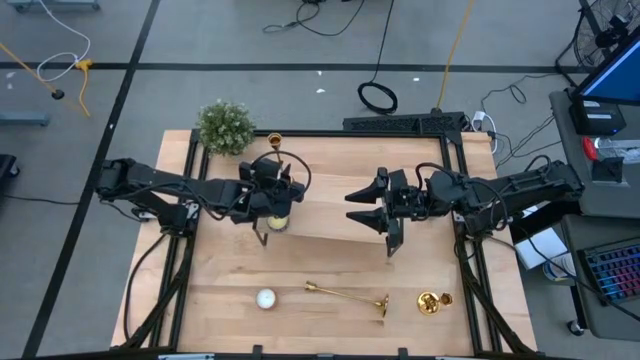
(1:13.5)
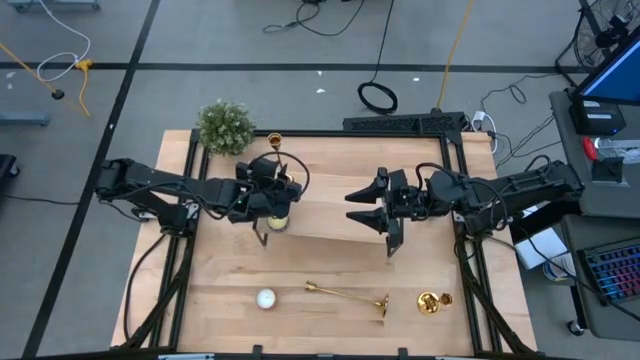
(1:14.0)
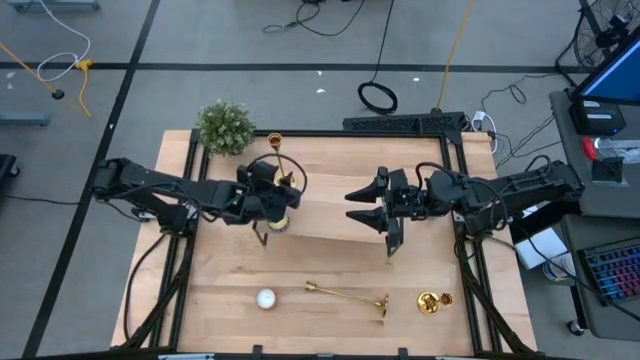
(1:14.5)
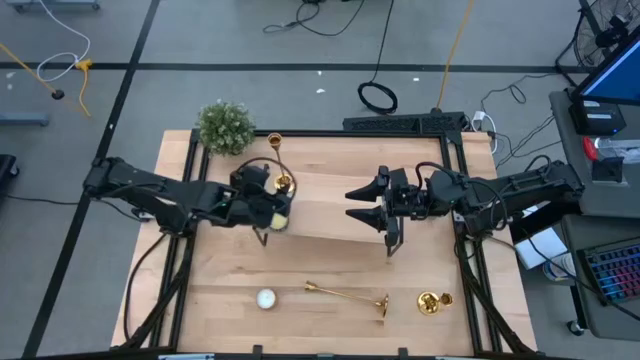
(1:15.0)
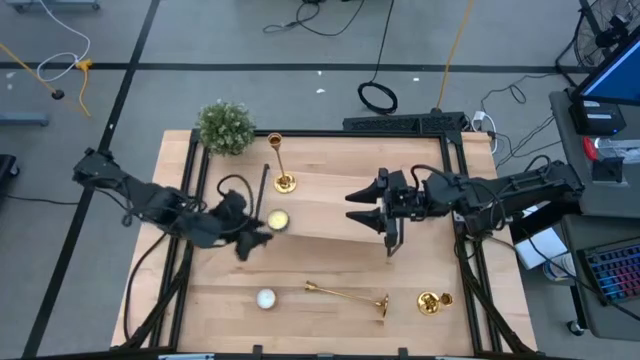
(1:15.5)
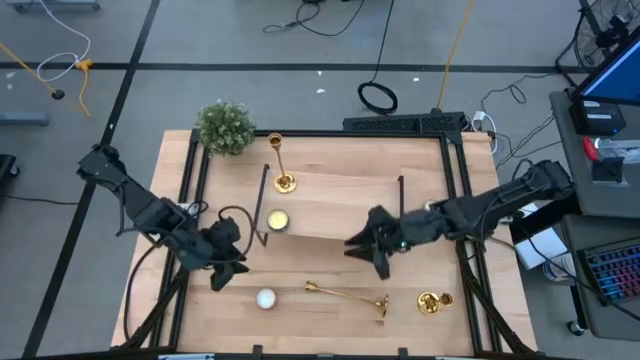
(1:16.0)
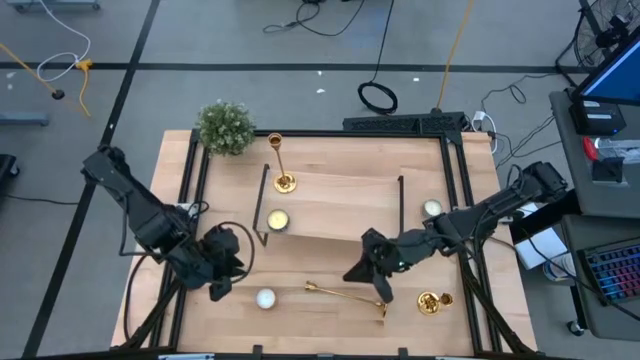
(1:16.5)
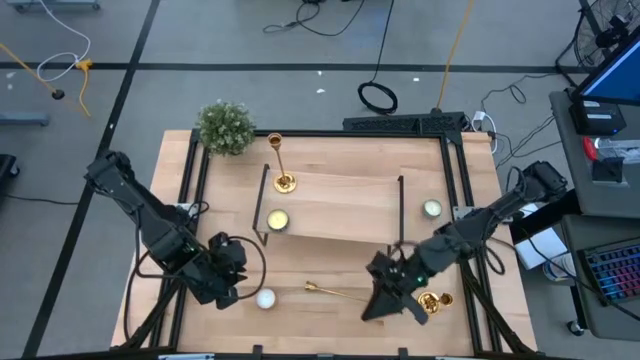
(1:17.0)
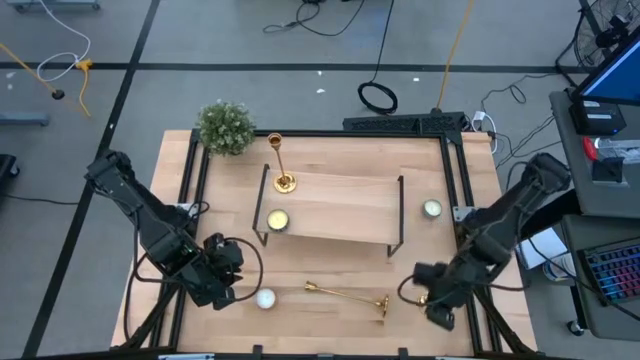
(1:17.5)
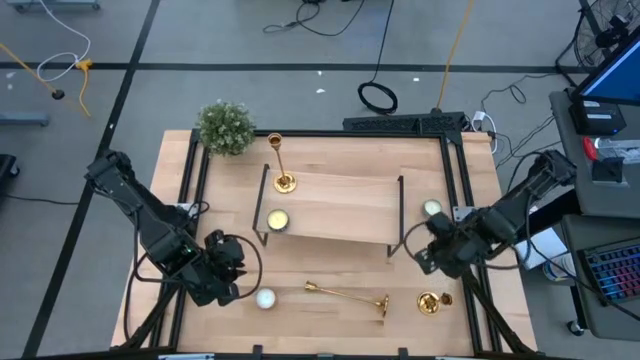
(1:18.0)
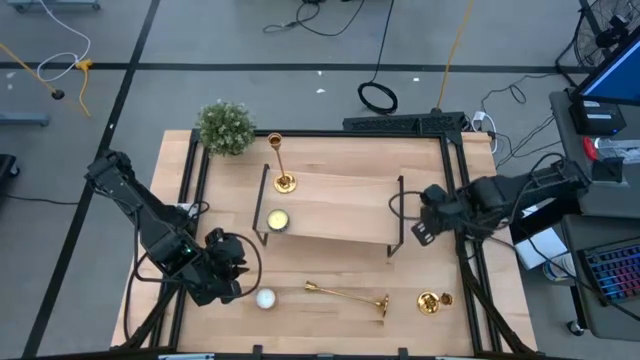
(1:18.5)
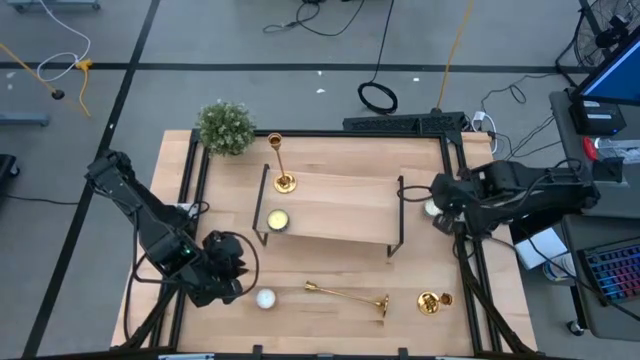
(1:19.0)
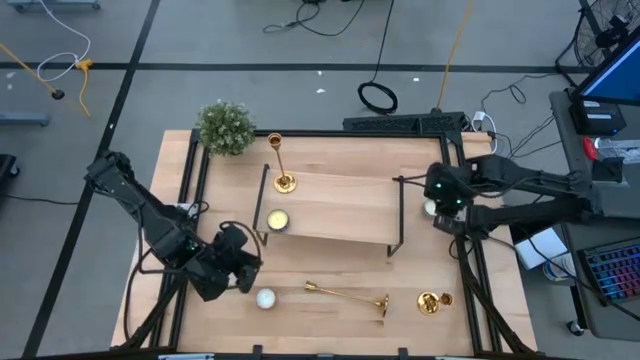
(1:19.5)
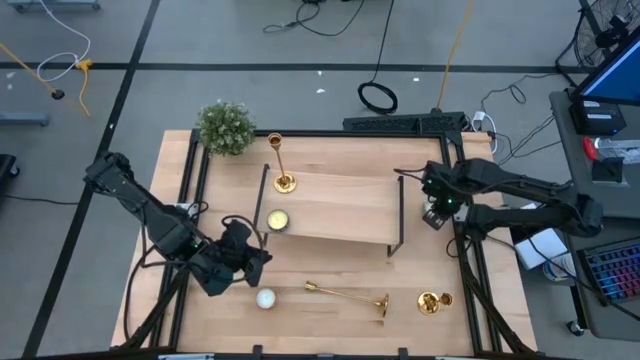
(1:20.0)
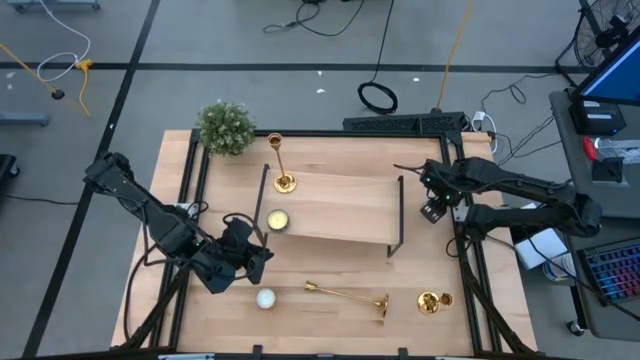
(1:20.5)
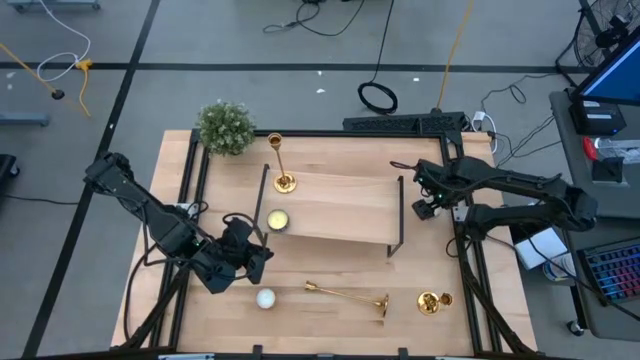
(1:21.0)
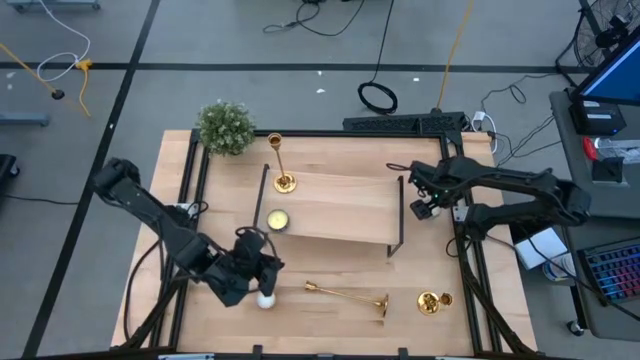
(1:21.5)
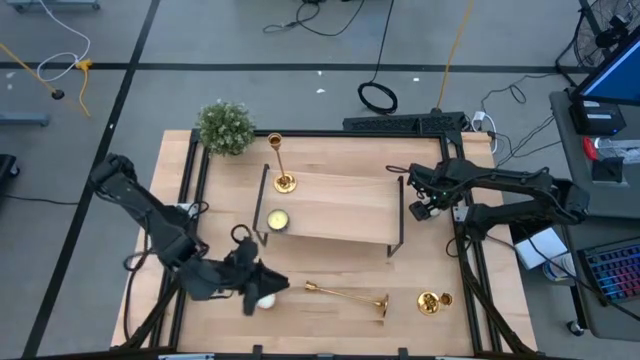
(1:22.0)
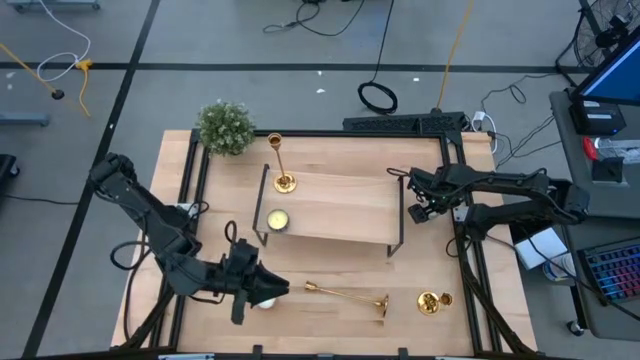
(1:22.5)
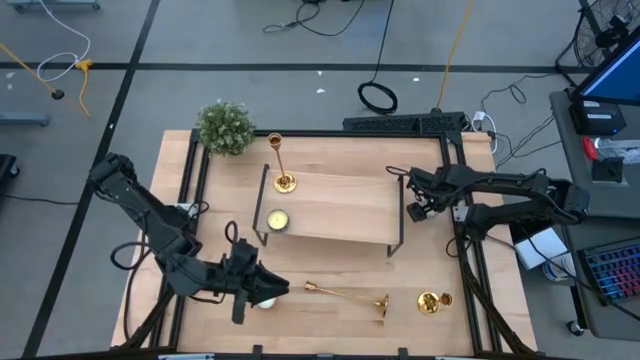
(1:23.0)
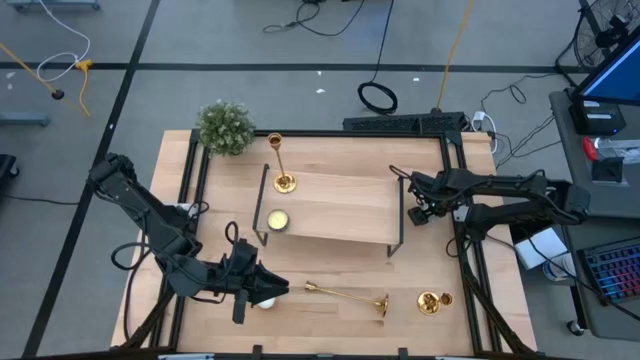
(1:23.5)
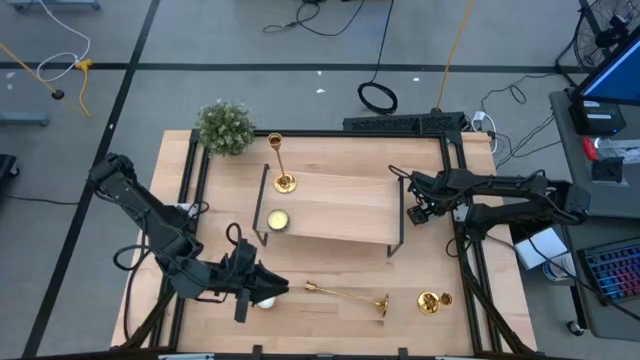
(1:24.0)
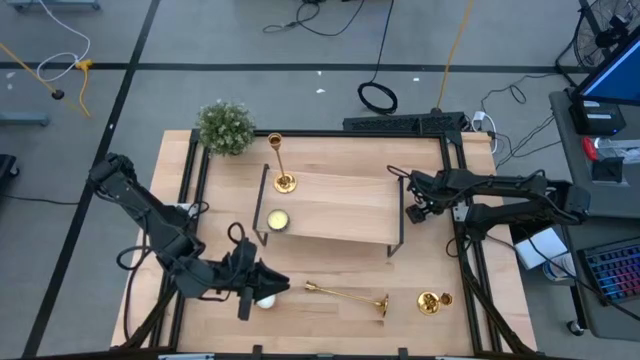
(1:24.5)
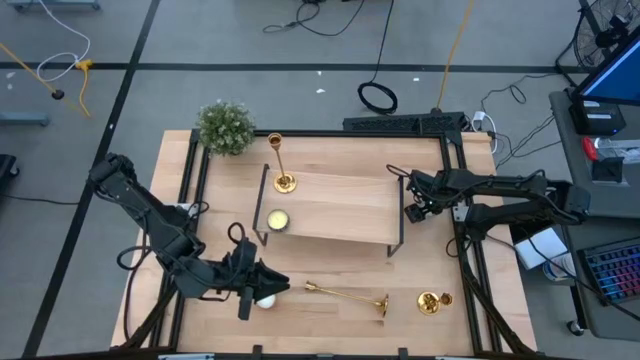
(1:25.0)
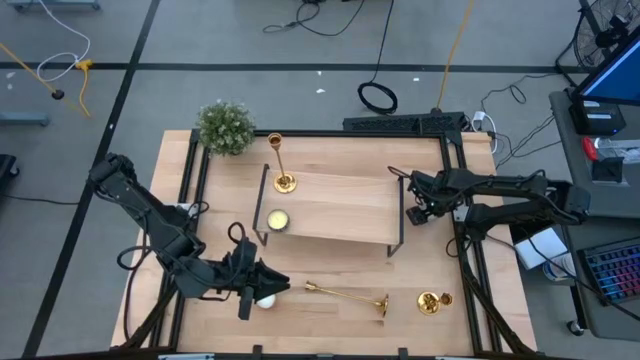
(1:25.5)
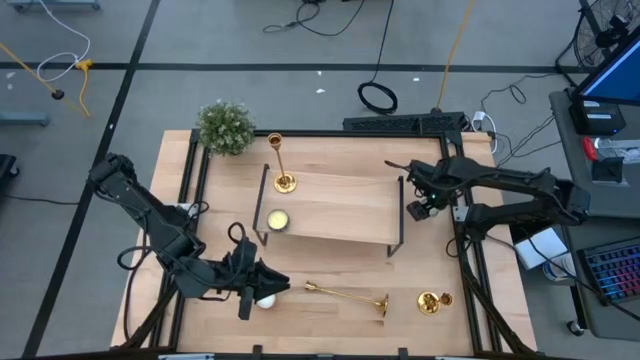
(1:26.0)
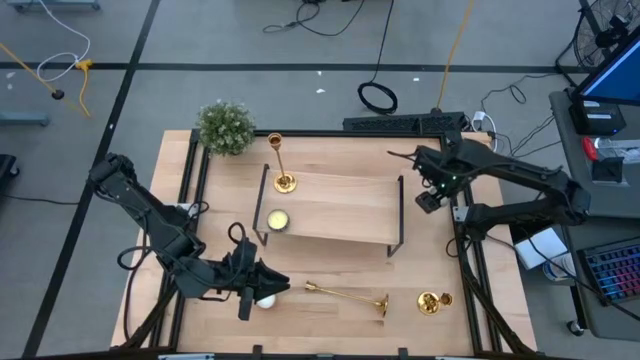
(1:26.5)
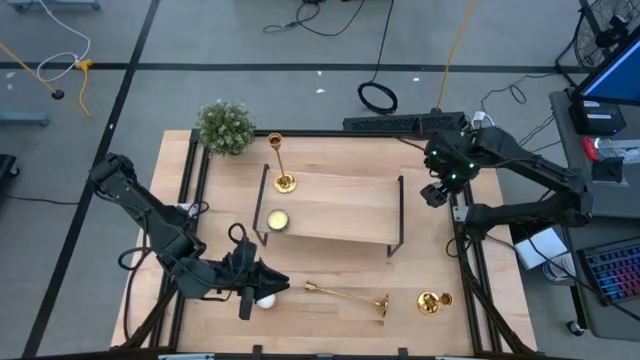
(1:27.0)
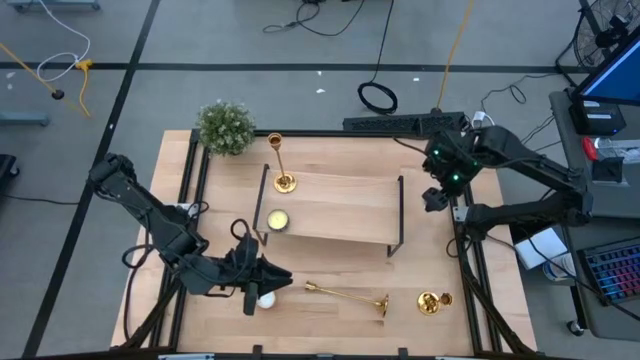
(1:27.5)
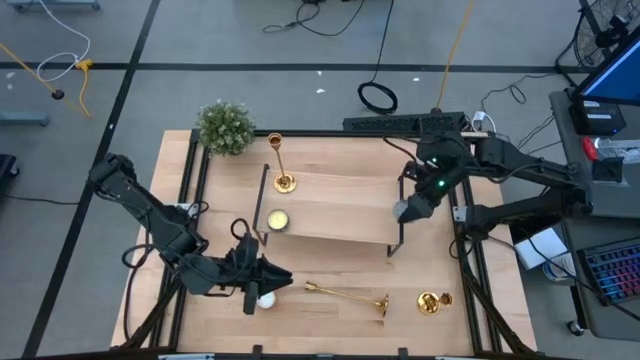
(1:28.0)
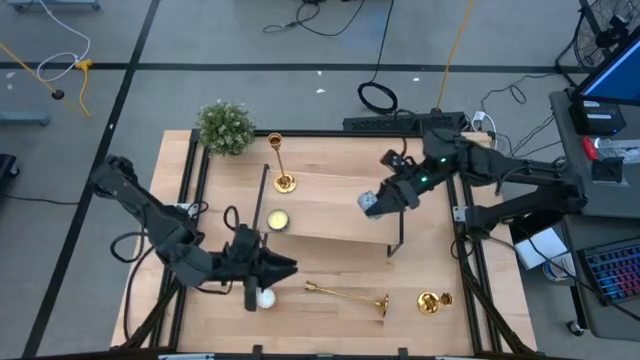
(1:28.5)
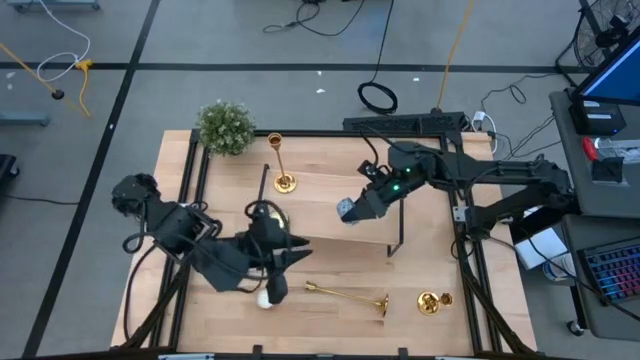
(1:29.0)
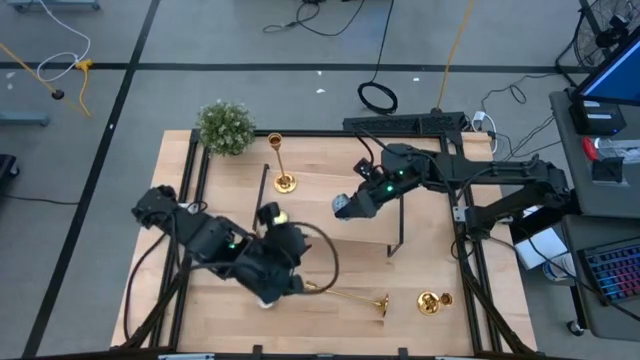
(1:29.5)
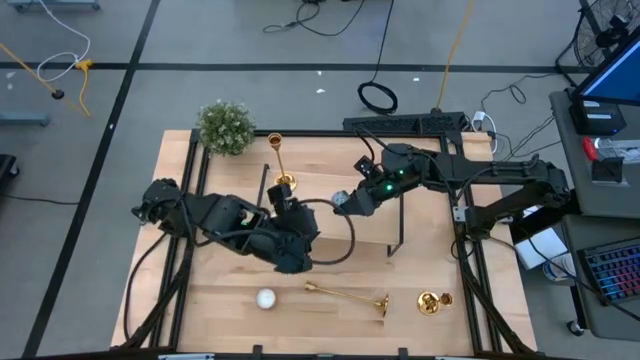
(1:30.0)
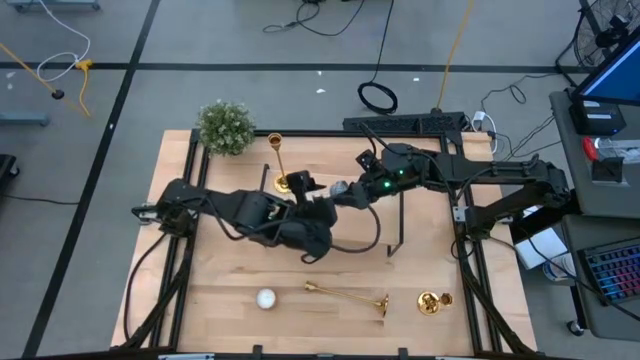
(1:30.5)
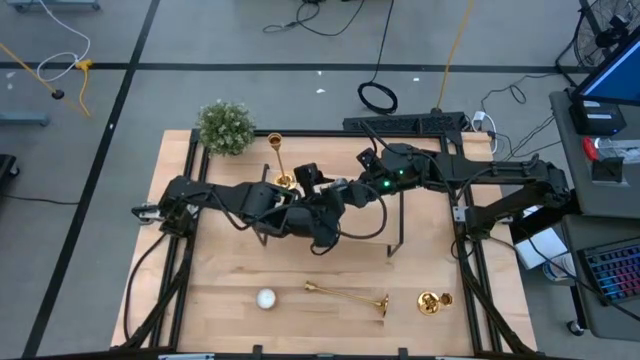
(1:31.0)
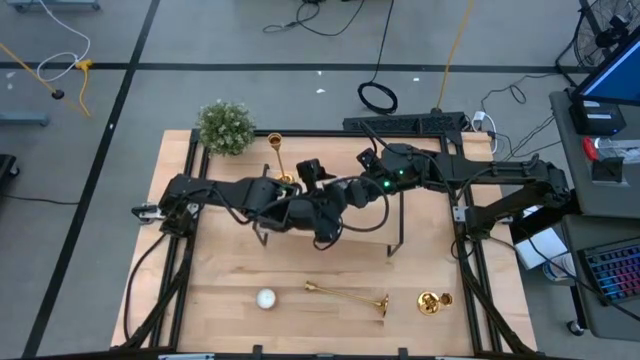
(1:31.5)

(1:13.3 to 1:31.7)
Task: Pick & Place candle stick holders
Put the blue scented candle on the shelf
